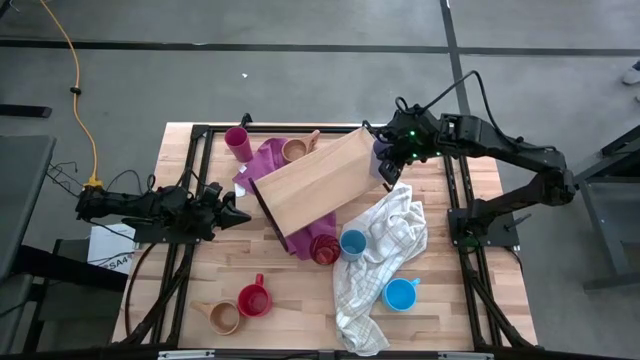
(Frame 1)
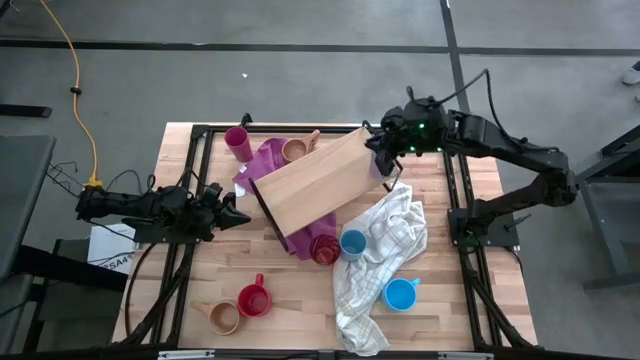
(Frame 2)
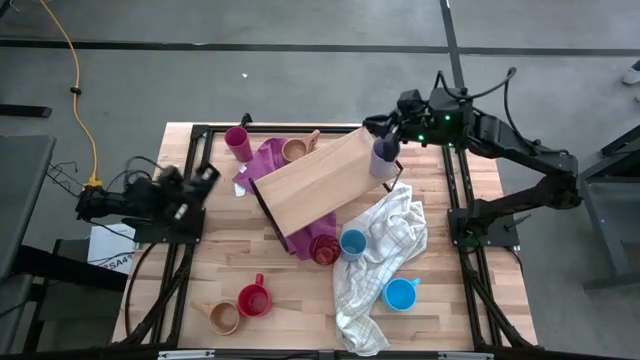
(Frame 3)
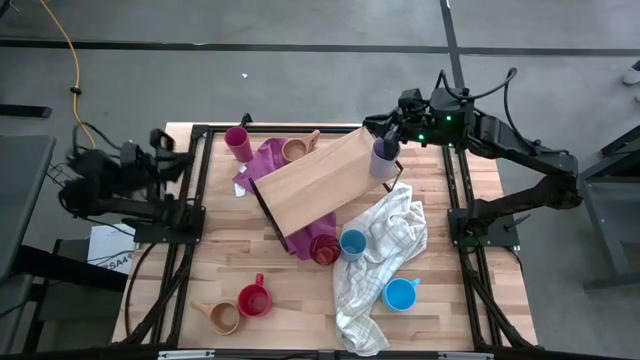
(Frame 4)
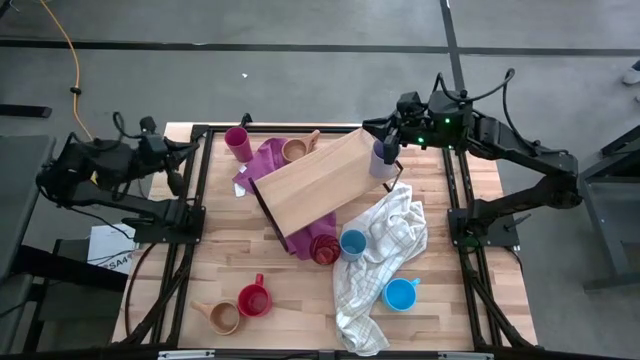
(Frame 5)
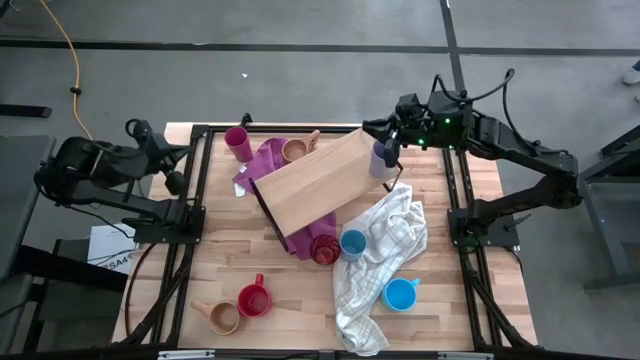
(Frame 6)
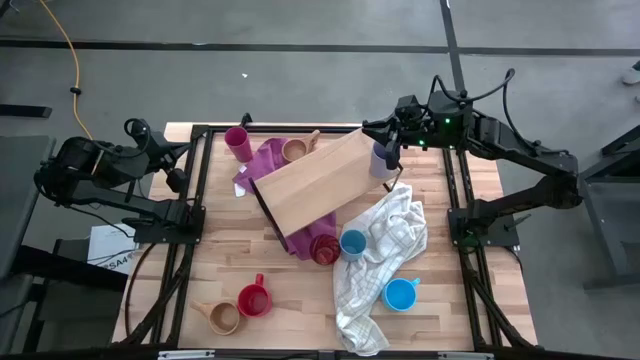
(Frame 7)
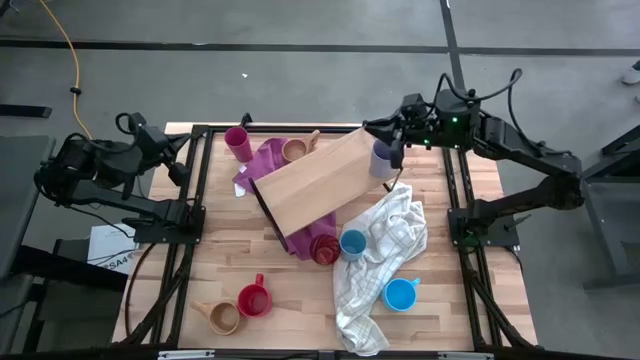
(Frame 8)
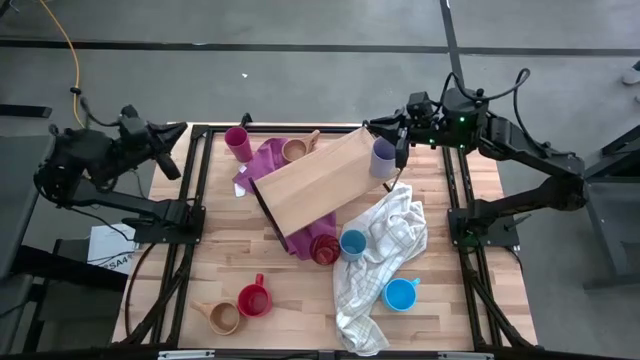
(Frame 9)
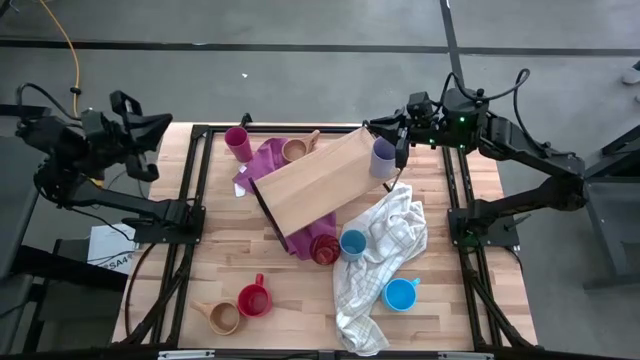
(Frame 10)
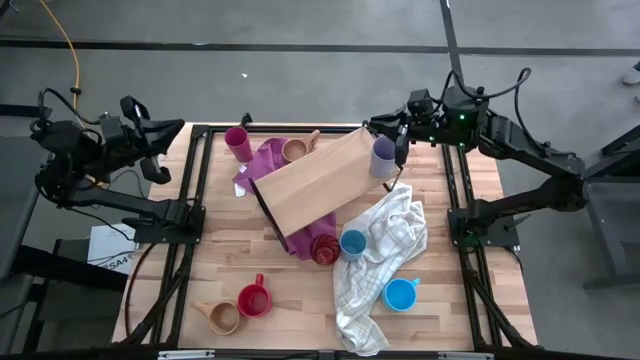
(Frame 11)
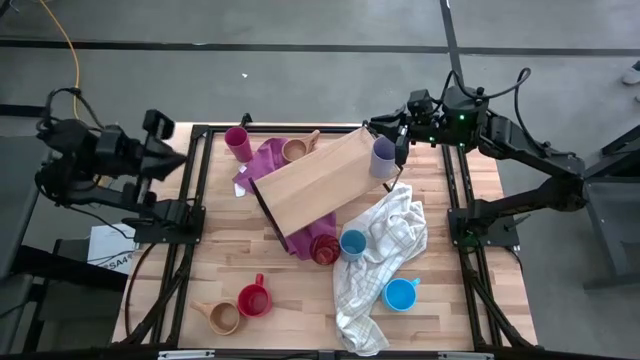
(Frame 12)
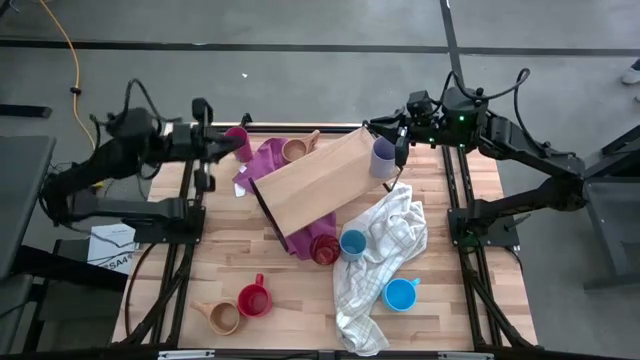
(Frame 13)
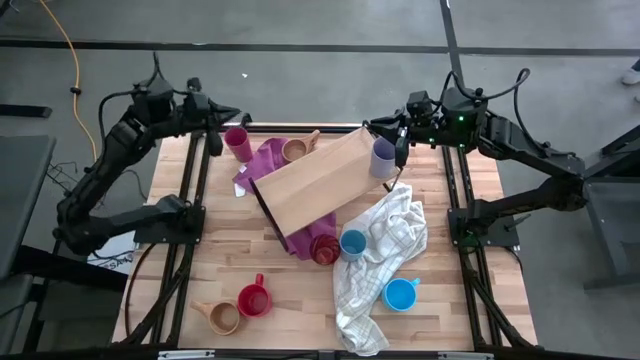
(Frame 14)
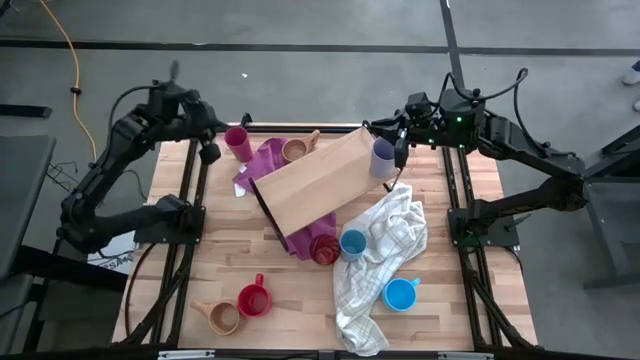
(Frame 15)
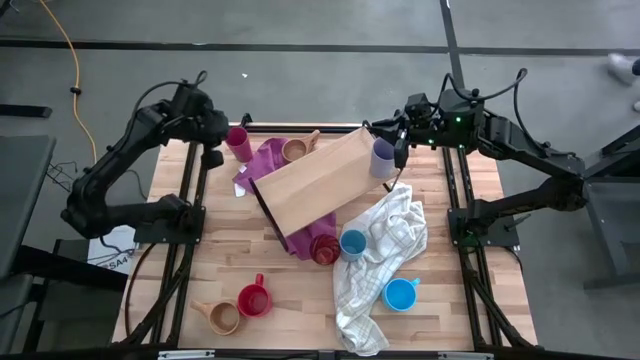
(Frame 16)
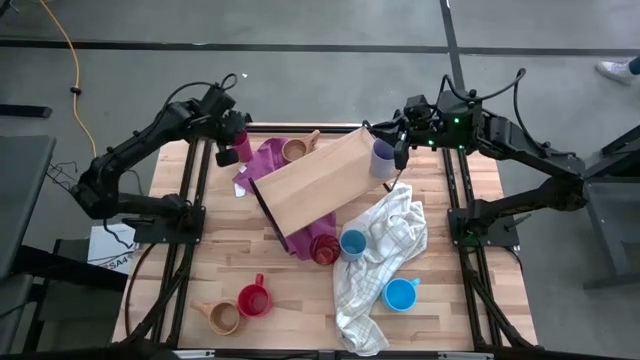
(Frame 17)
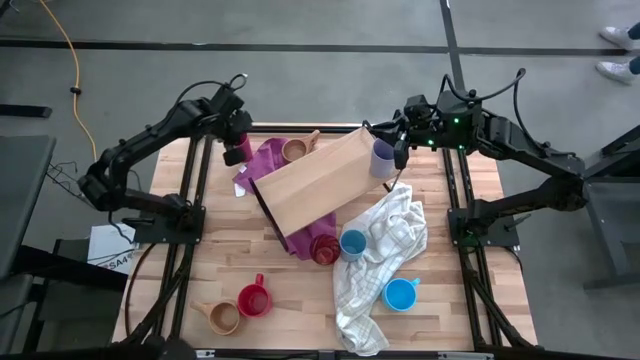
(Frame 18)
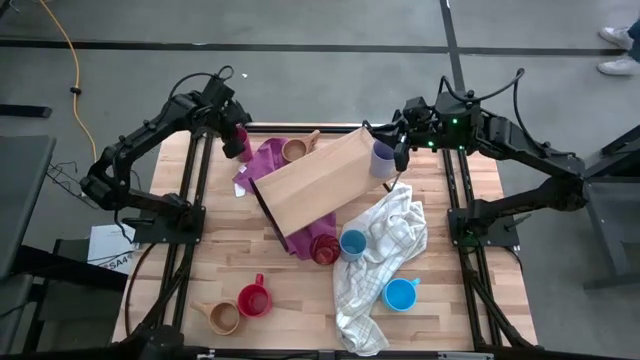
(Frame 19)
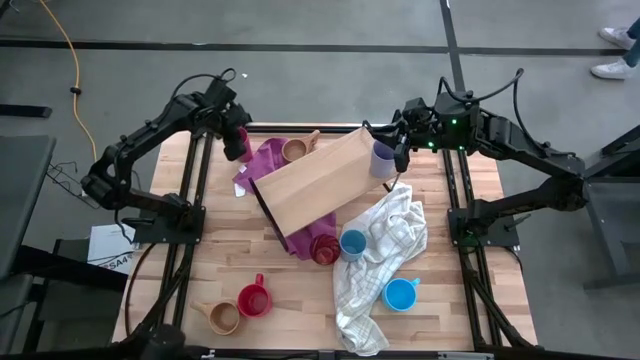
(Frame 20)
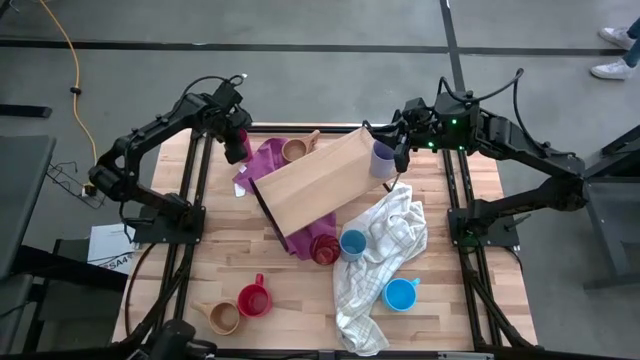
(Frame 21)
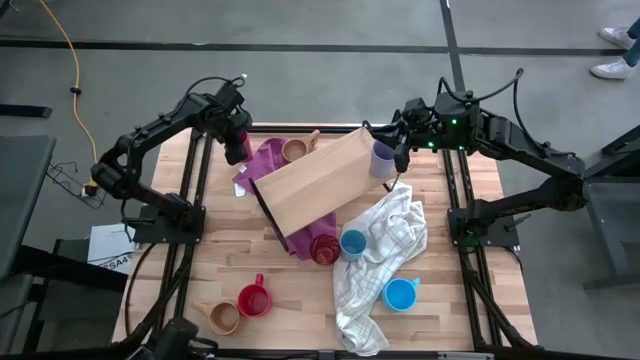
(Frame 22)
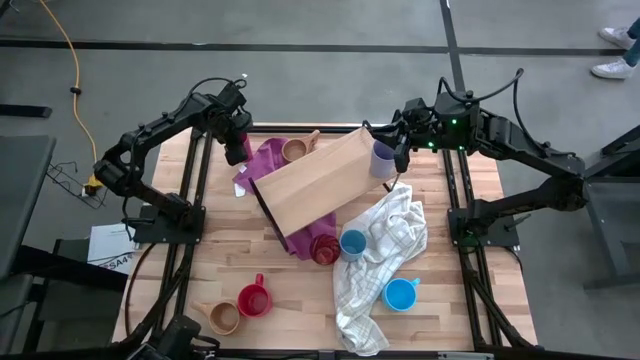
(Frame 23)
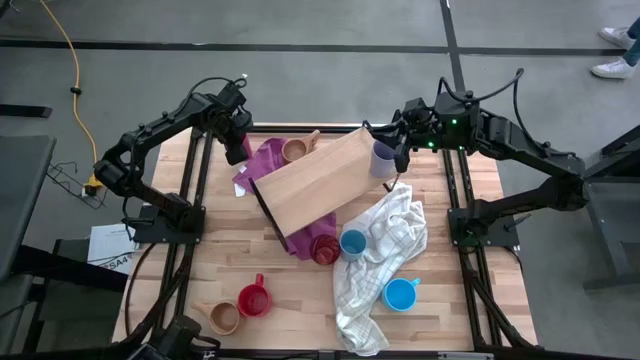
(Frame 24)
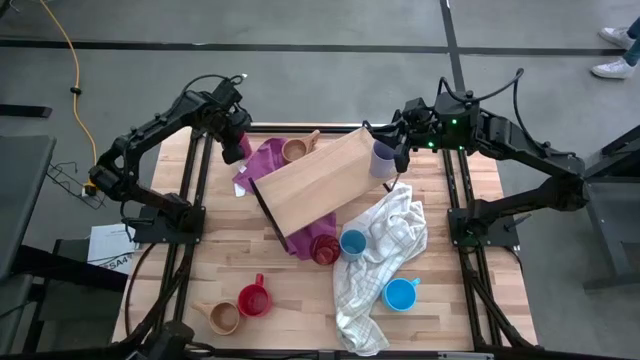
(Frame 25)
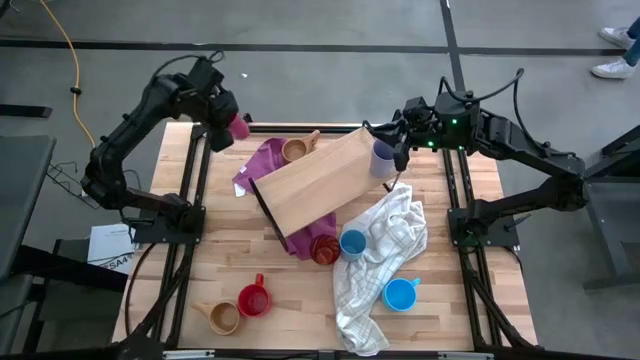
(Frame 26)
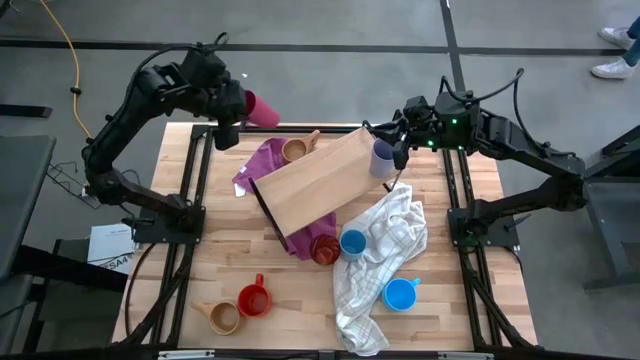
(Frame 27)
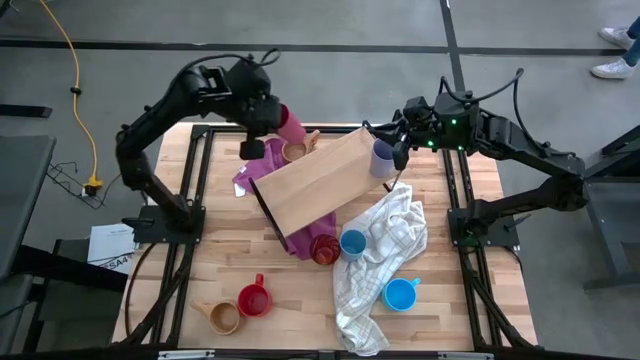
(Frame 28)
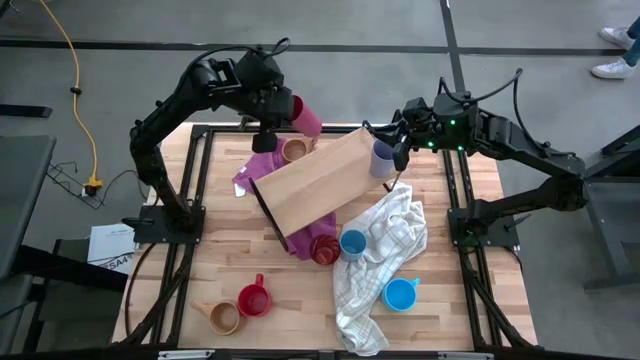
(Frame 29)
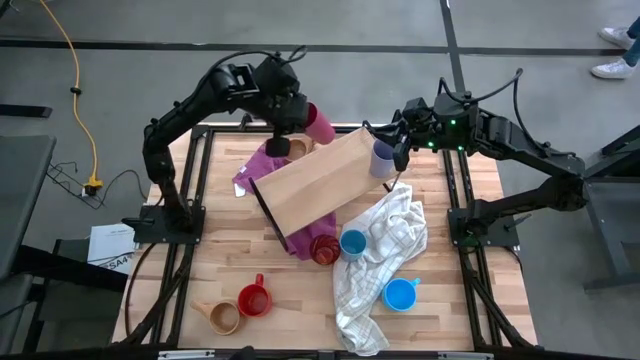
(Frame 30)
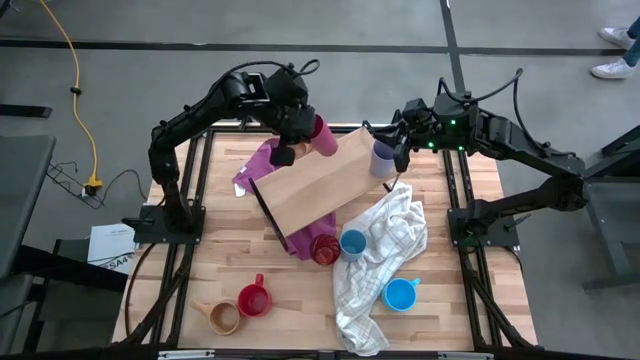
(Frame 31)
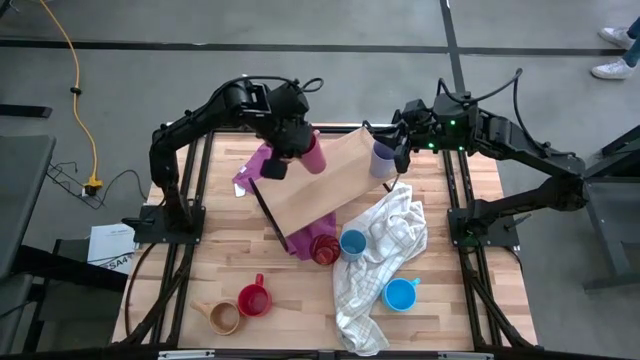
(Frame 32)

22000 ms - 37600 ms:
Task: Stack small to large cups/mugs on shelf
Put the pink cup on the shelf

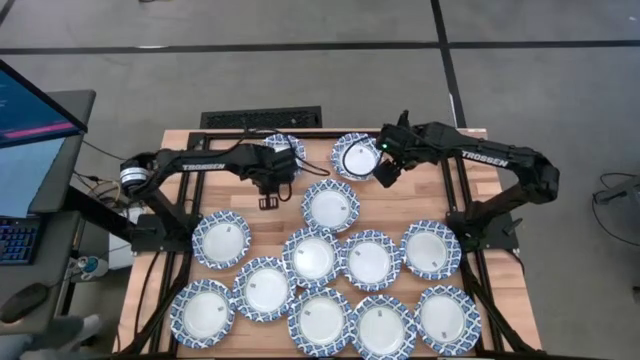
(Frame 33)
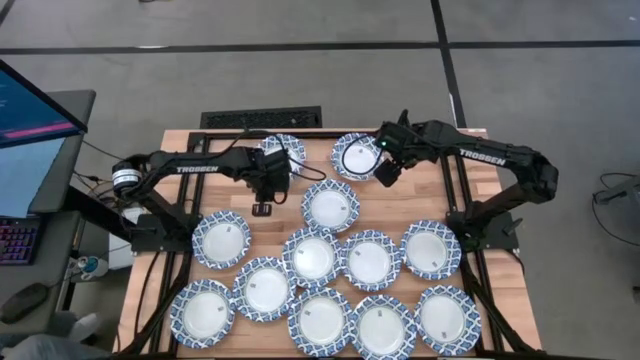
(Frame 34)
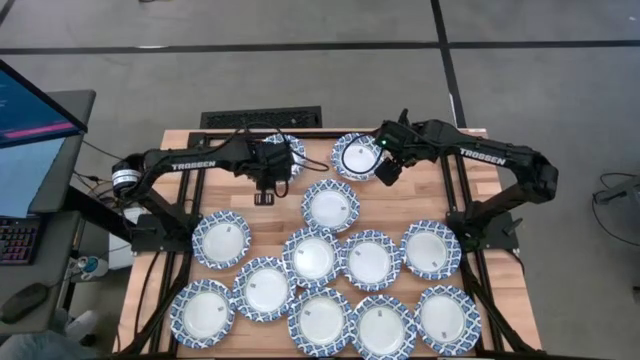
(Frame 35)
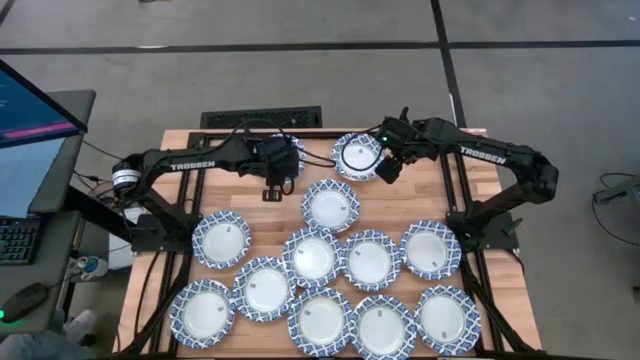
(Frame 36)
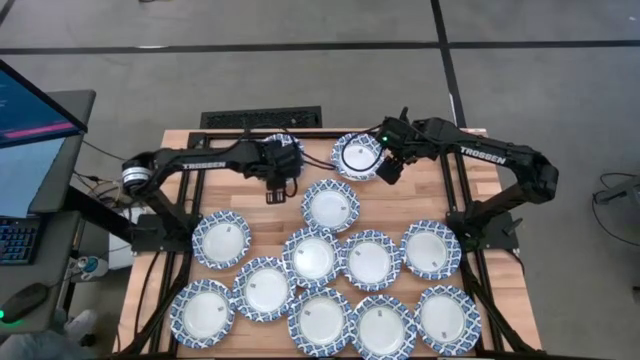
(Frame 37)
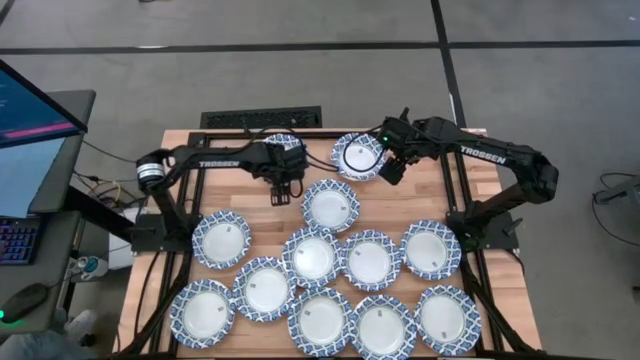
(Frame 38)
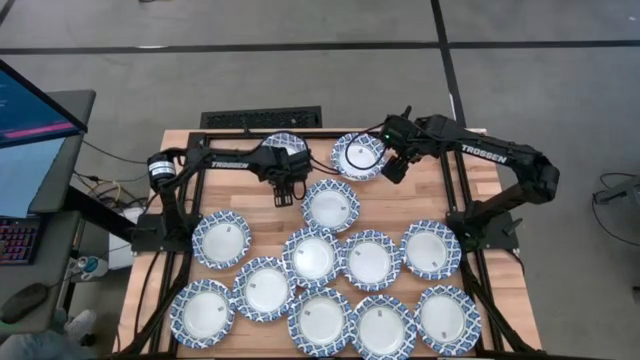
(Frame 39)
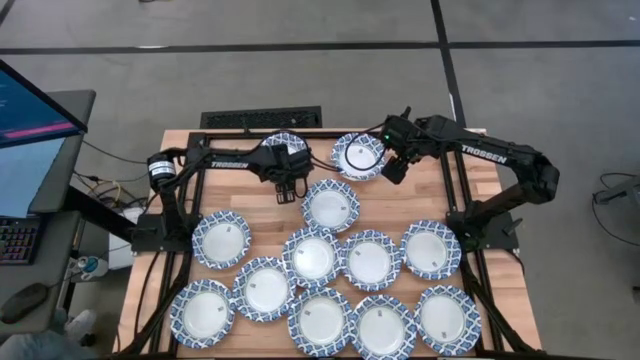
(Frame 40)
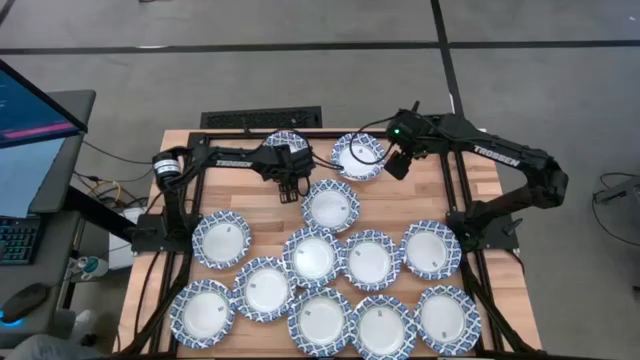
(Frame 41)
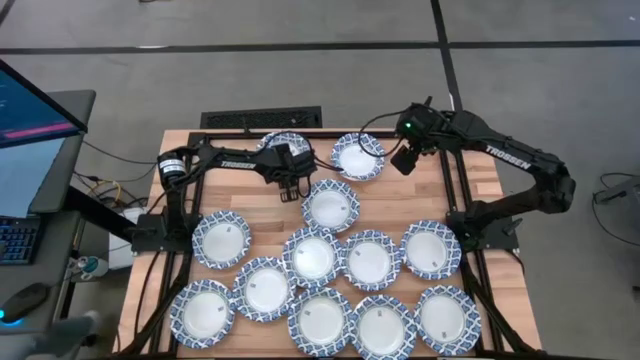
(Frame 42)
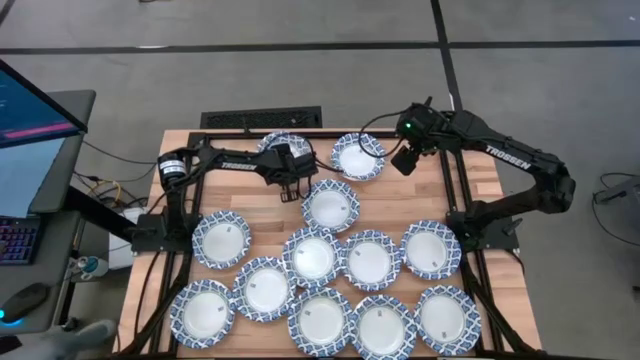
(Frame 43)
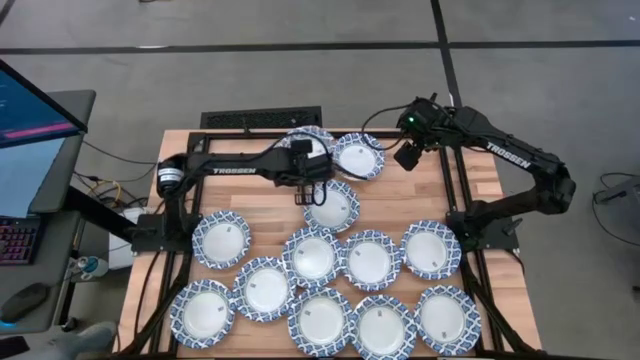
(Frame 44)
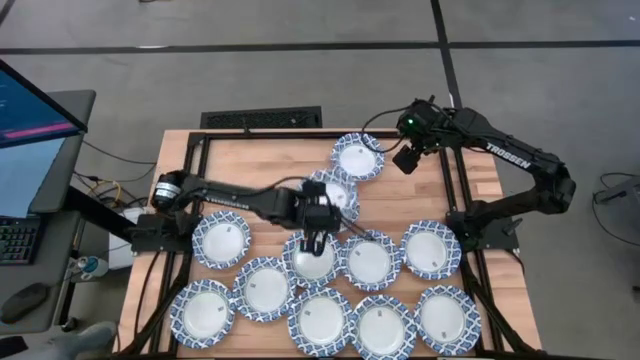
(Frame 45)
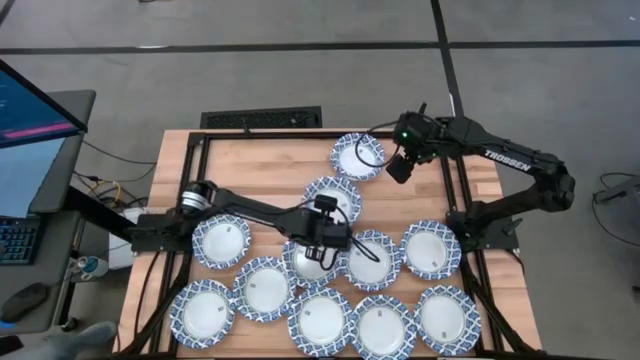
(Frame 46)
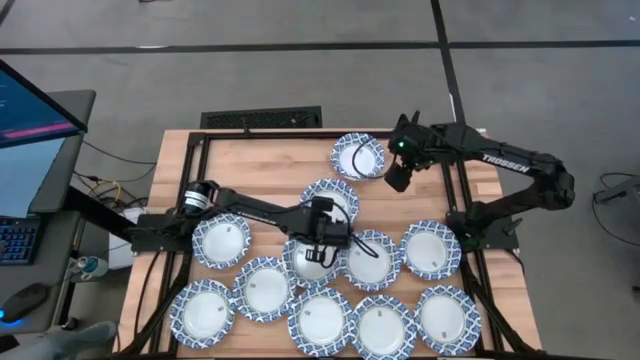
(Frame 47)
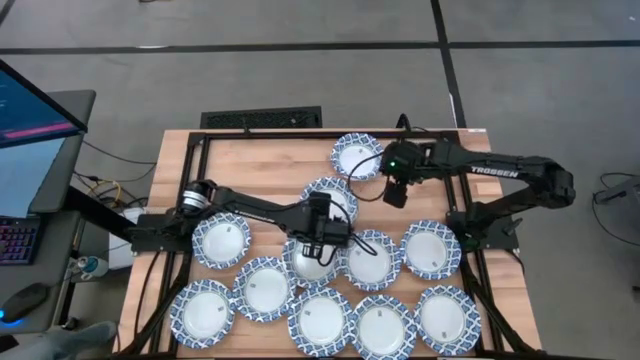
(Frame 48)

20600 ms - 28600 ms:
Task: Nest bowls inside each other
Stack the white stacked bowls on the stacked white bowls
